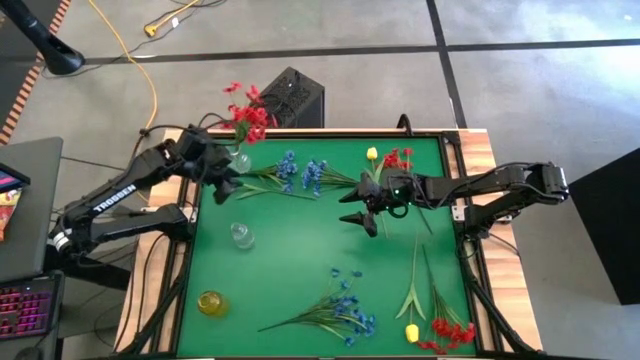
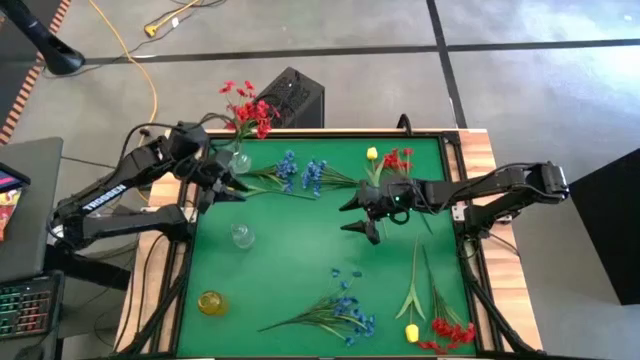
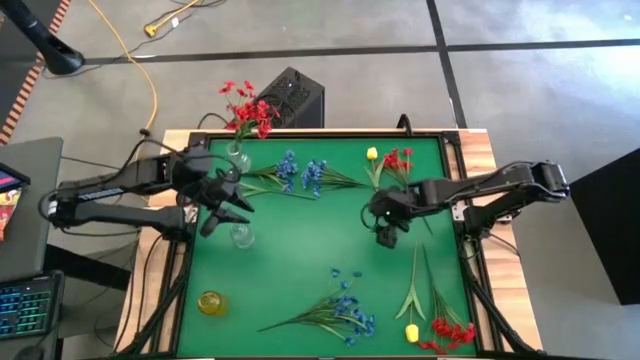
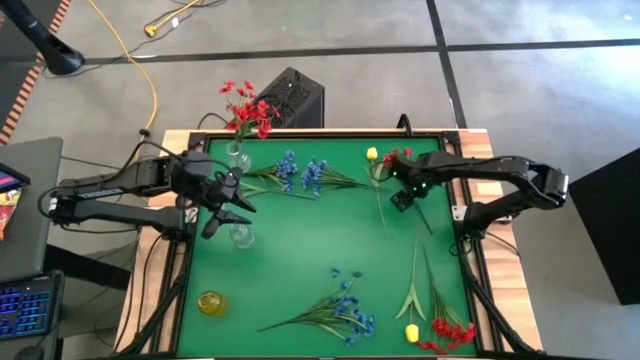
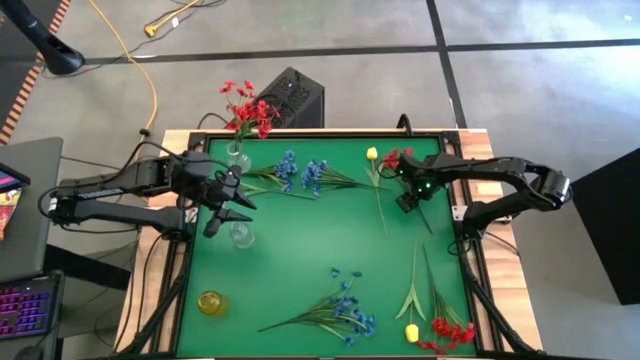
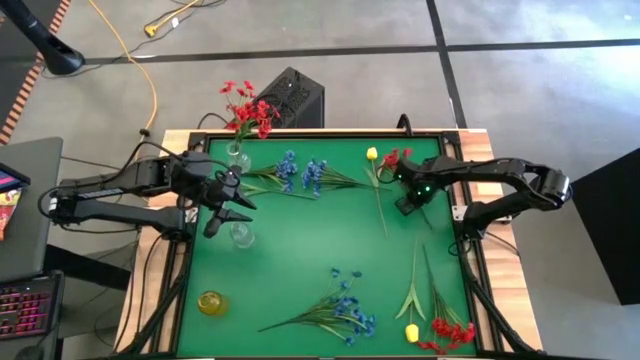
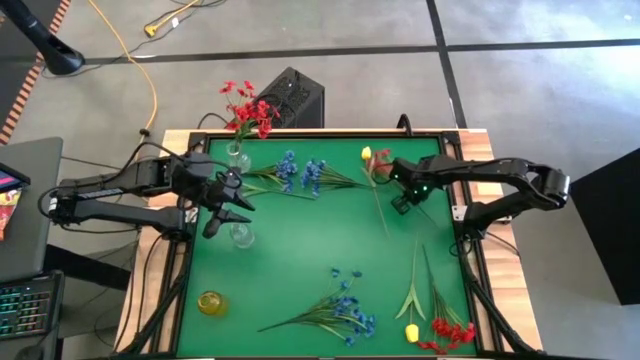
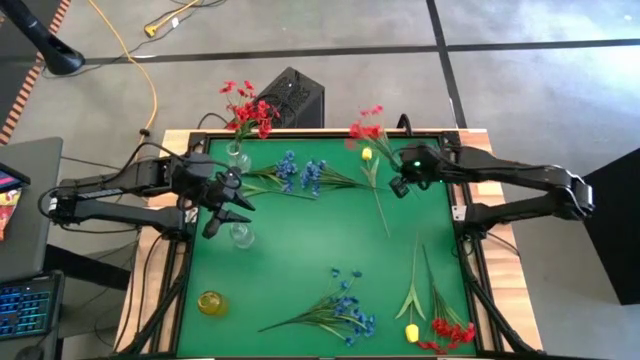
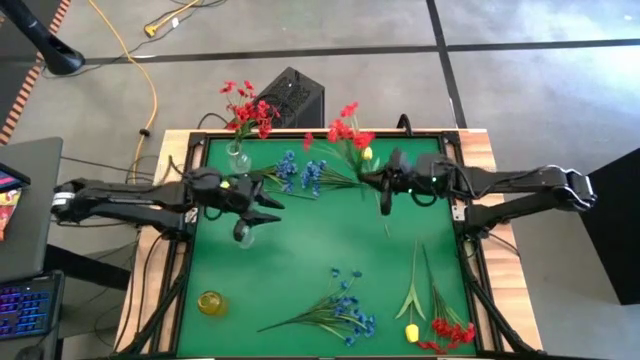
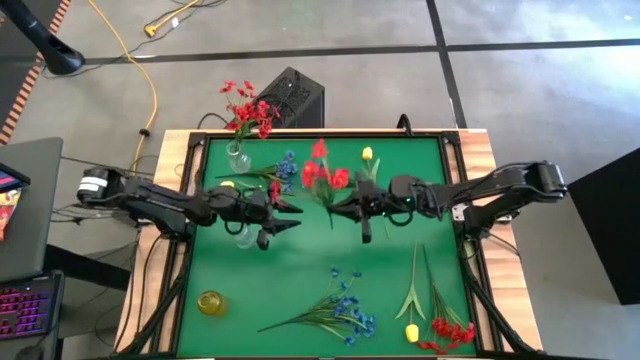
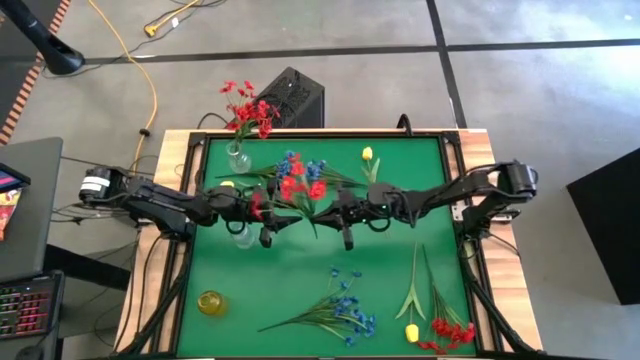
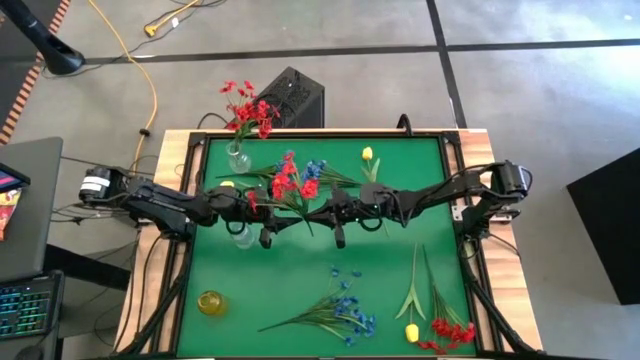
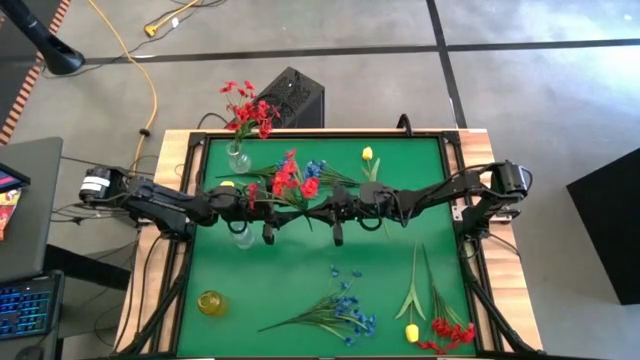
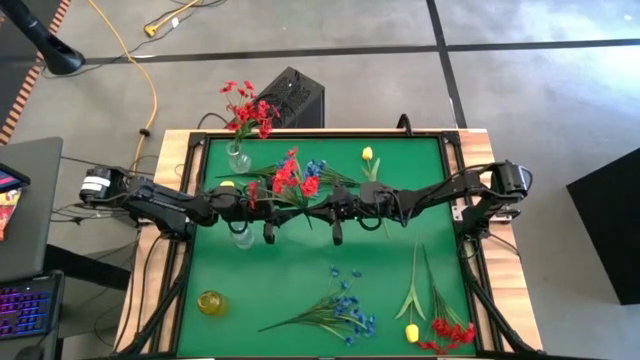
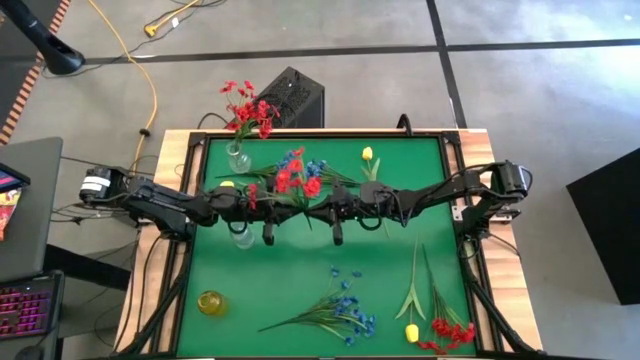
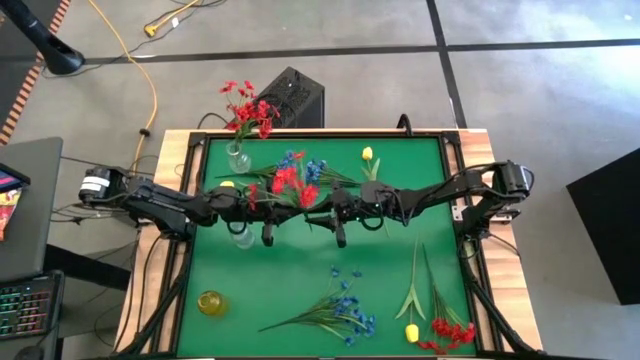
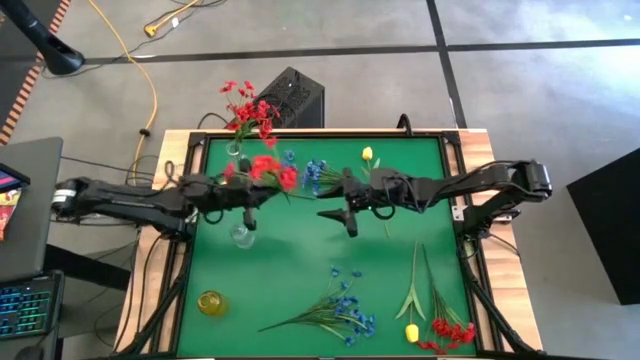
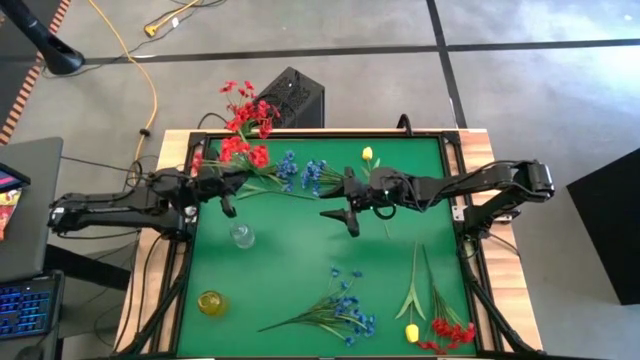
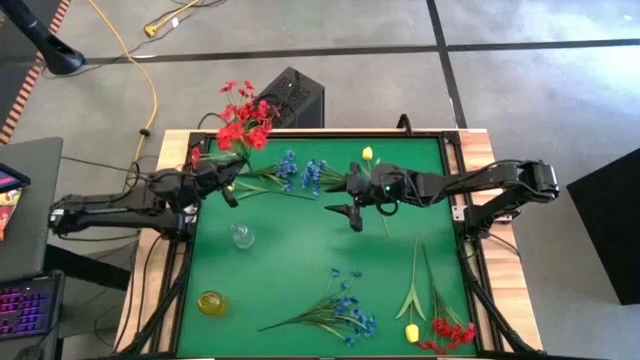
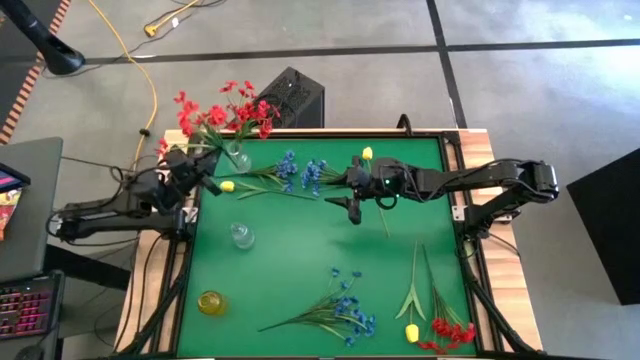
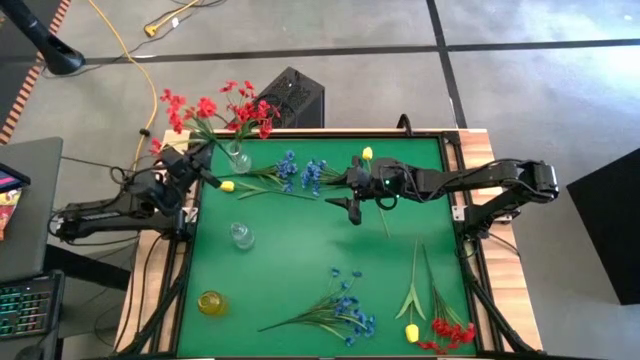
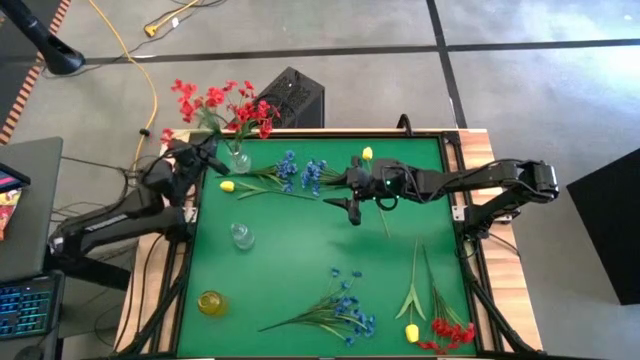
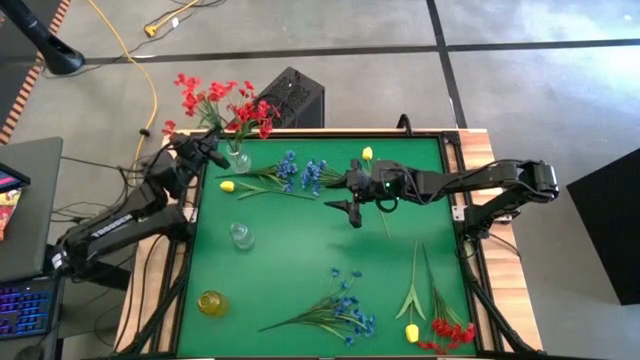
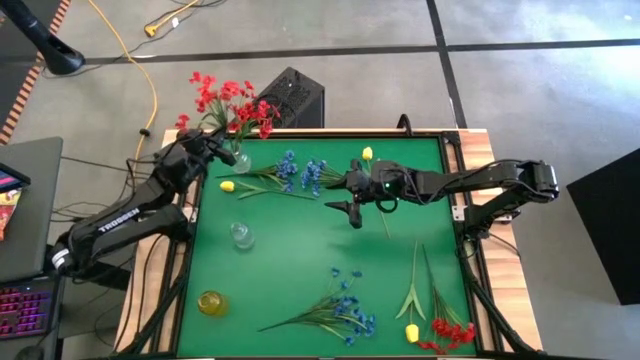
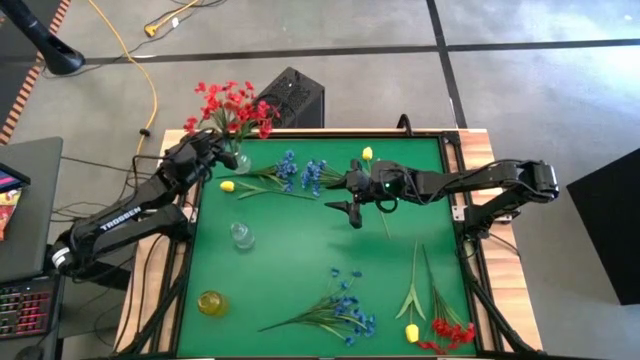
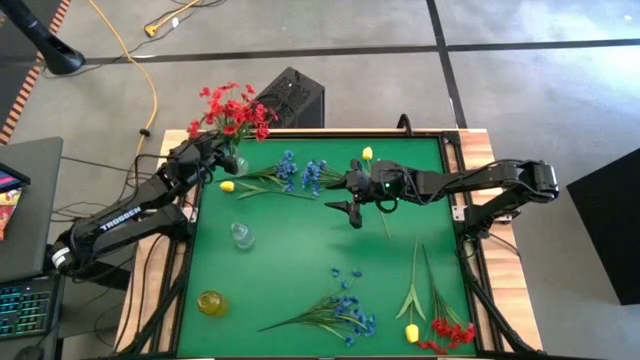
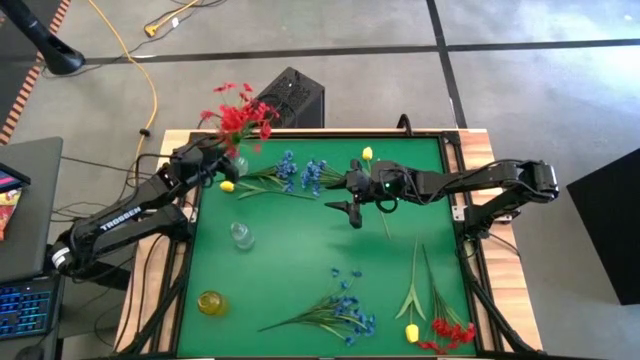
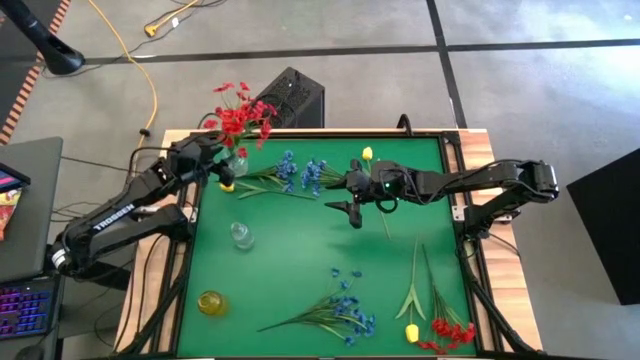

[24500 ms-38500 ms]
Task: Sort flowers into vase by color
Put the top red flowers into the top transparent vase
